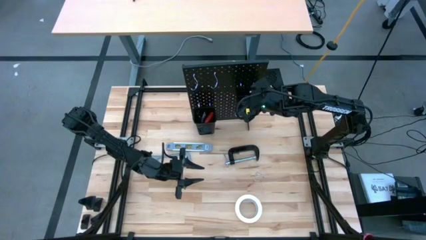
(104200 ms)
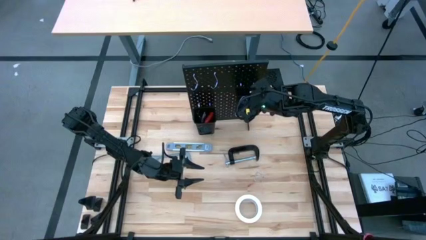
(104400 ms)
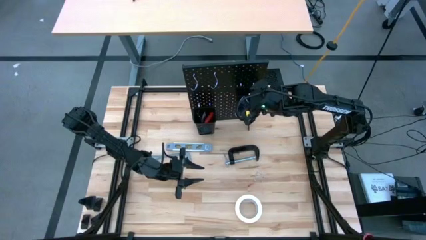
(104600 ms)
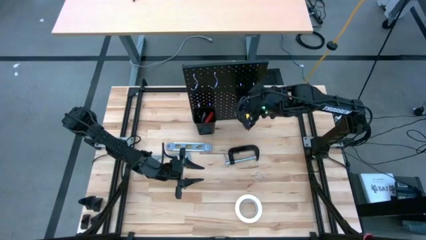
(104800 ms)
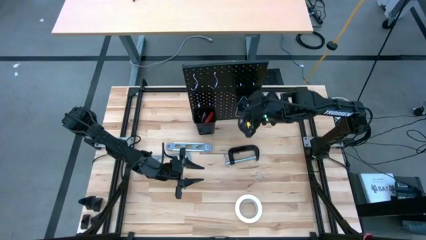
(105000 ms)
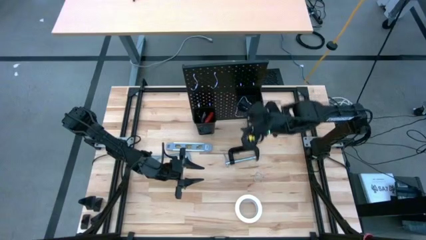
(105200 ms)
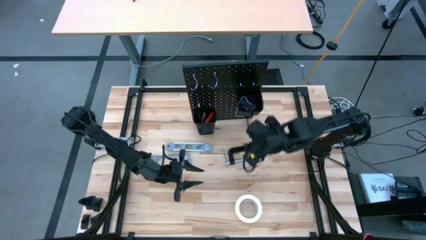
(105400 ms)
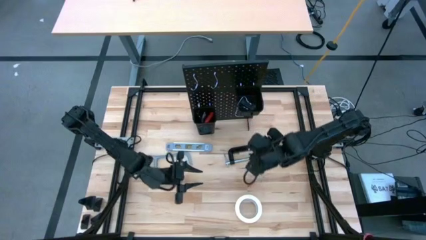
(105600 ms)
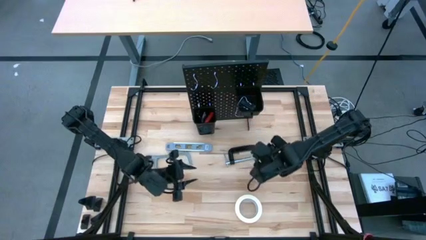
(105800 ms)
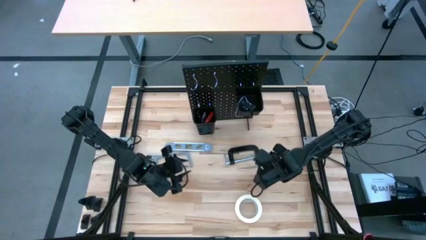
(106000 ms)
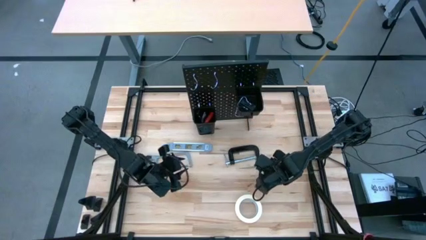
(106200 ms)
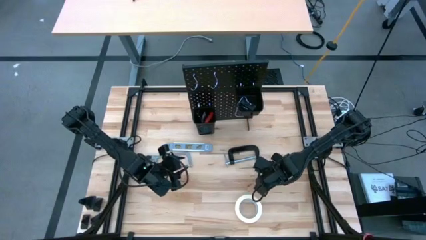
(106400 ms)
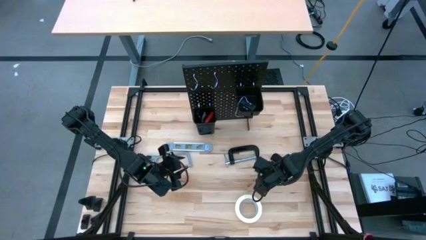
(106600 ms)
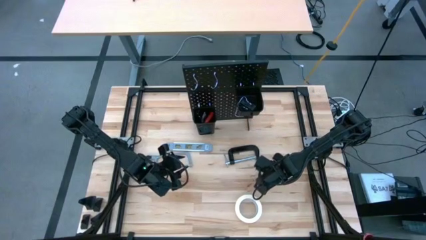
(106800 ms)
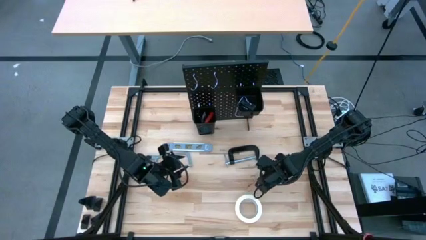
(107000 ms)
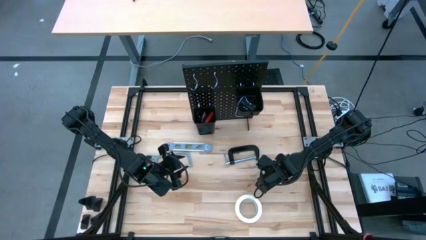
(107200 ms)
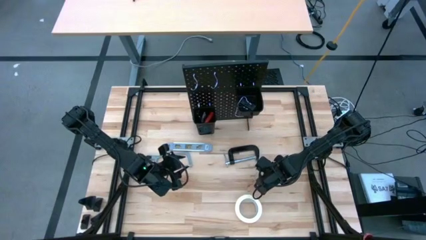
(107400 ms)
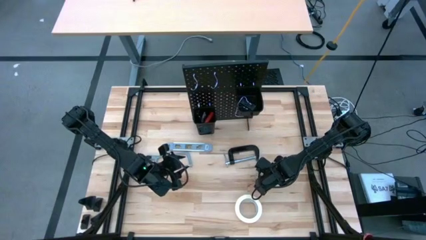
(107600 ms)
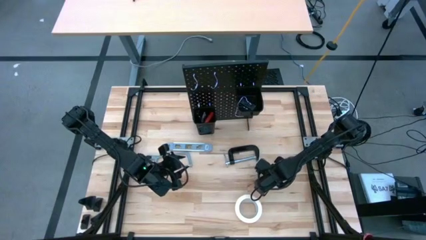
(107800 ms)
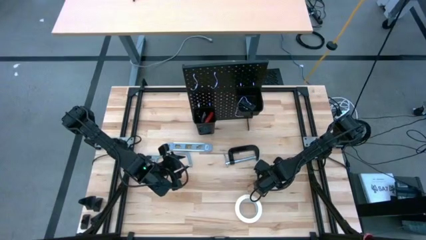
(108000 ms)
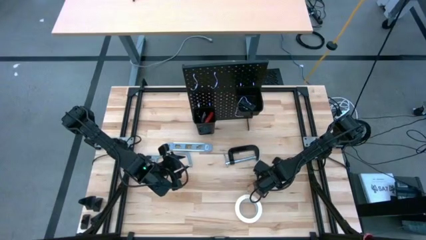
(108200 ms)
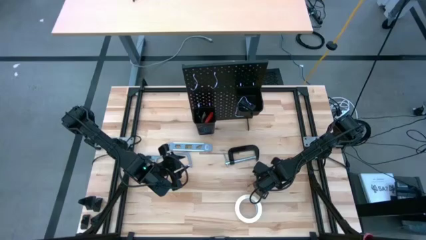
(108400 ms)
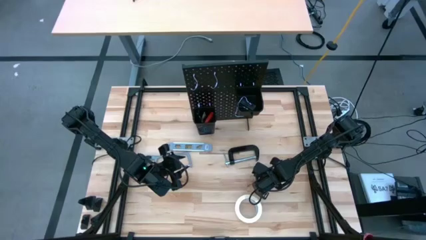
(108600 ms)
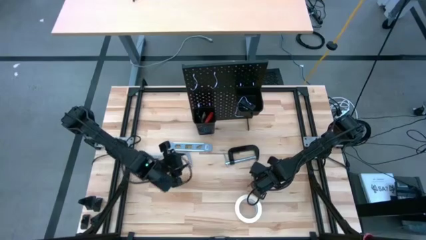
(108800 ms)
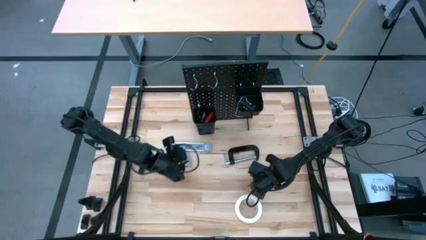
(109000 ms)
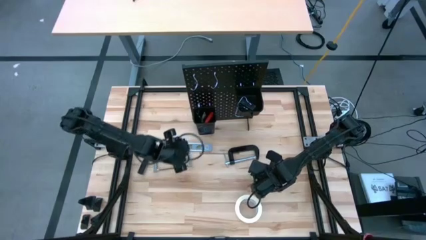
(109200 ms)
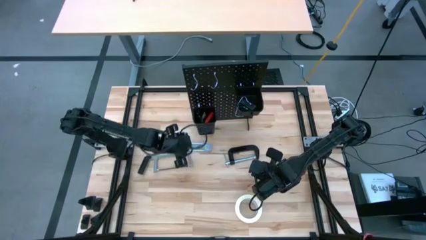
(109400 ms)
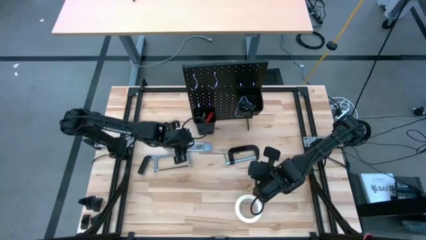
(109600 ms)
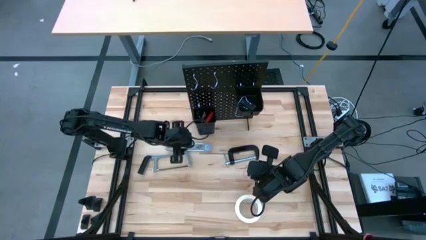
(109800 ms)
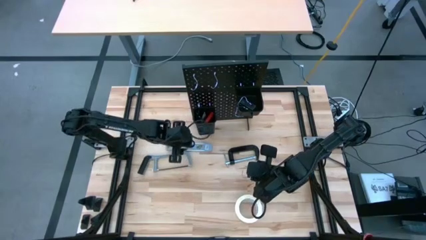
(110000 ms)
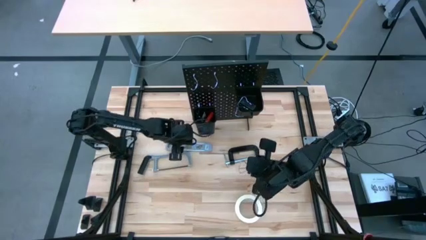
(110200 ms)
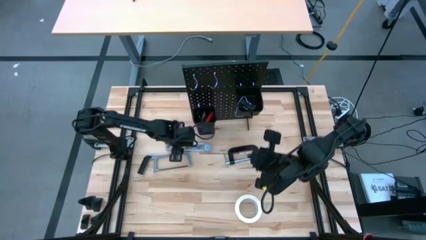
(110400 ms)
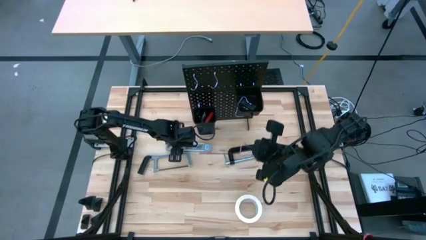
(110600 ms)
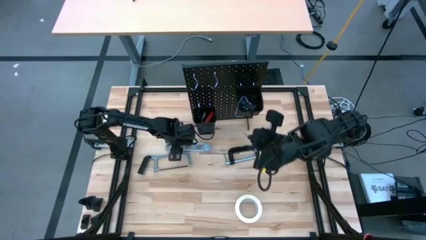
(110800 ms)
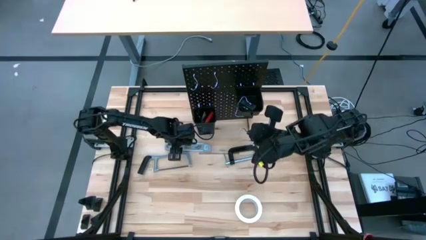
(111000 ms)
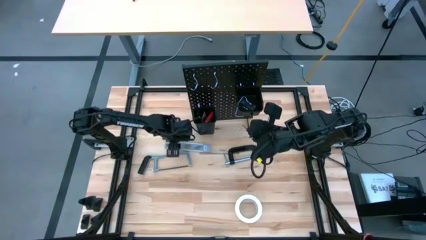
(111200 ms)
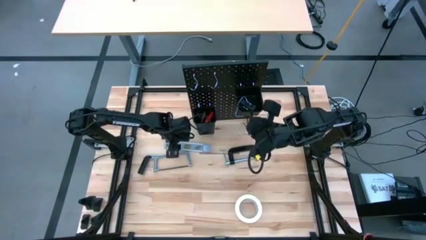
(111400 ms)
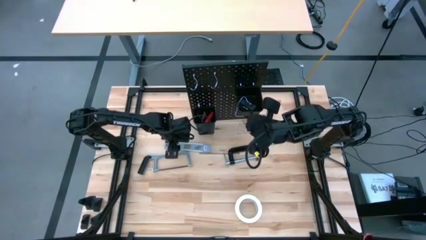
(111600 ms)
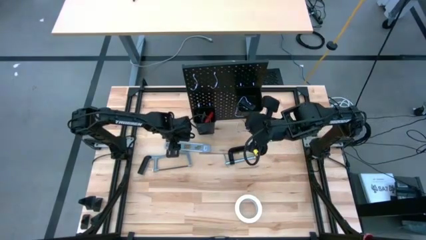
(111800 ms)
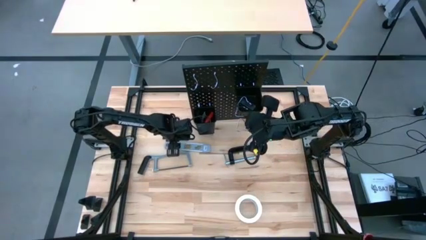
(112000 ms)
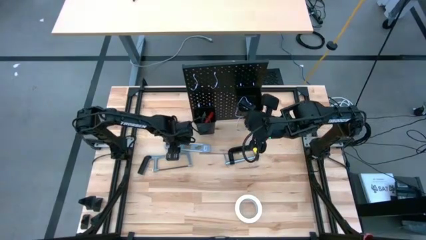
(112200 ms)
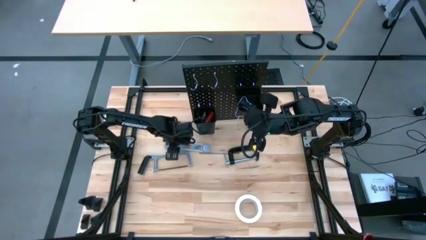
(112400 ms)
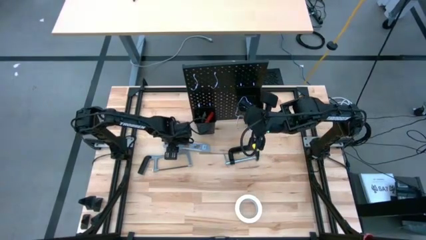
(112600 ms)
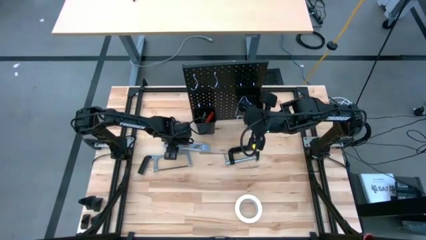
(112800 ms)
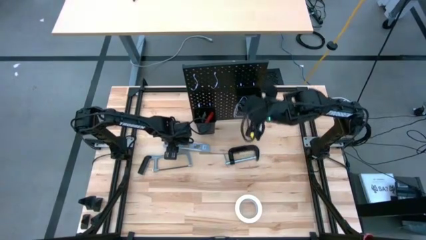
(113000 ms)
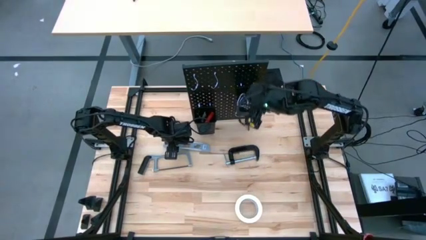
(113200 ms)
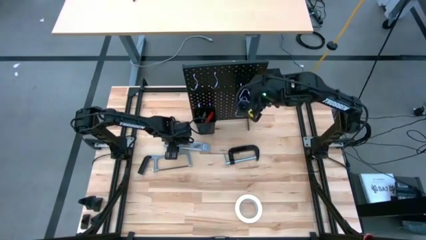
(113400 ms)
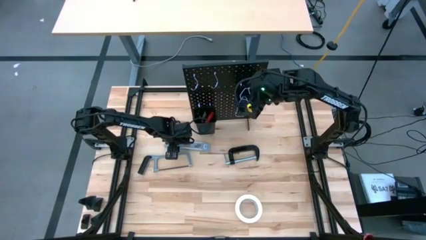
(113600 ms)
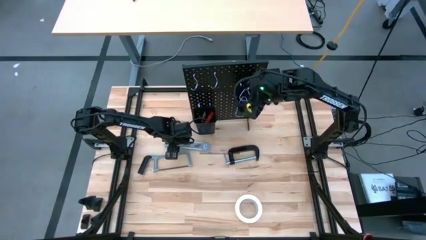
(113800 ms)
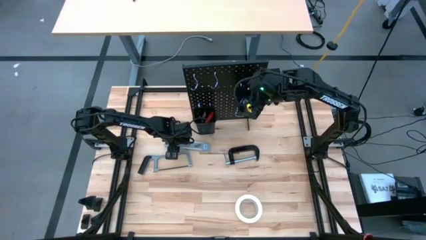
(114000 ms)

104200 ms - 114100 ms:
Task: Hang tools onto peg board
Put the binder clip into the top black bin on the pegboard

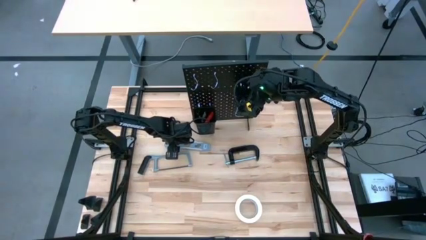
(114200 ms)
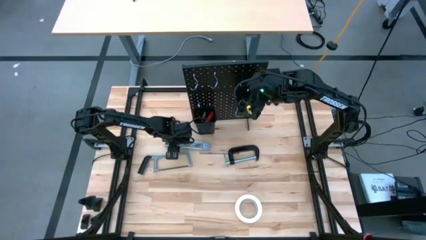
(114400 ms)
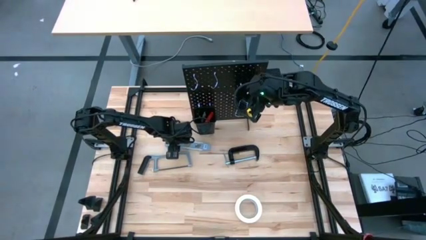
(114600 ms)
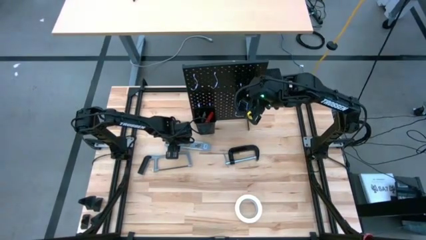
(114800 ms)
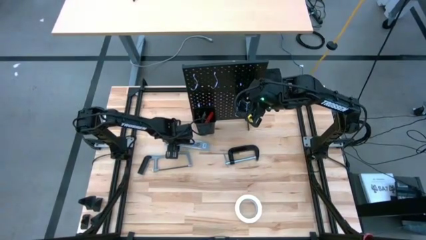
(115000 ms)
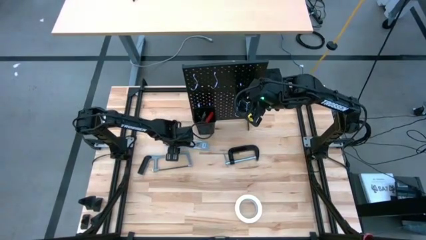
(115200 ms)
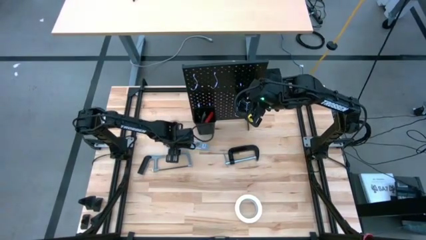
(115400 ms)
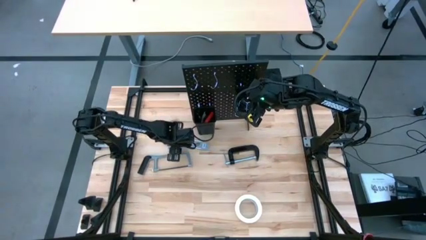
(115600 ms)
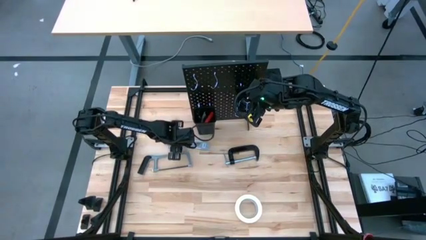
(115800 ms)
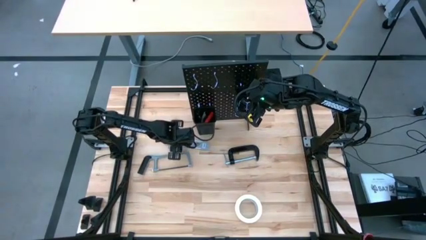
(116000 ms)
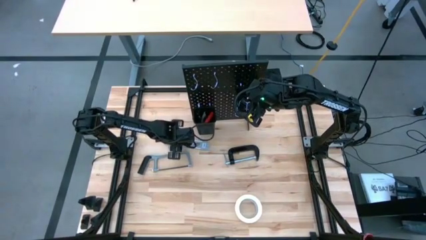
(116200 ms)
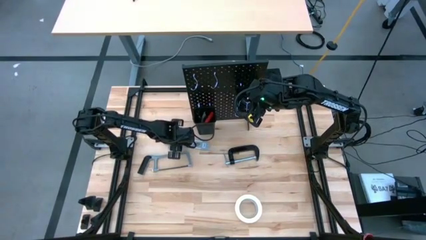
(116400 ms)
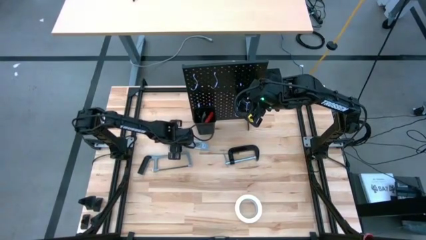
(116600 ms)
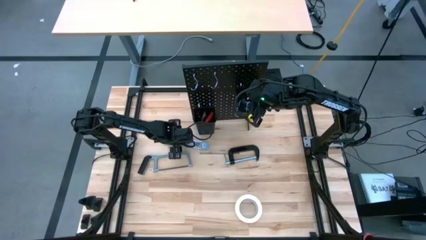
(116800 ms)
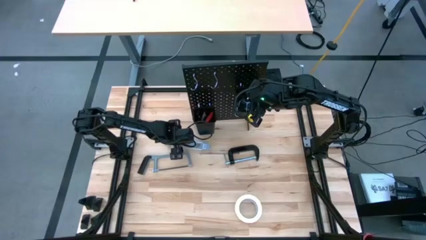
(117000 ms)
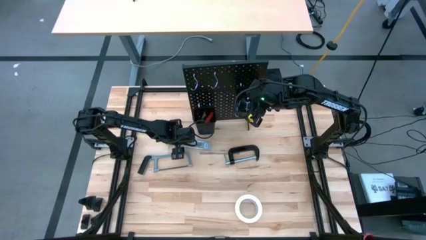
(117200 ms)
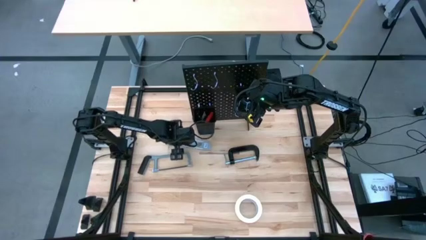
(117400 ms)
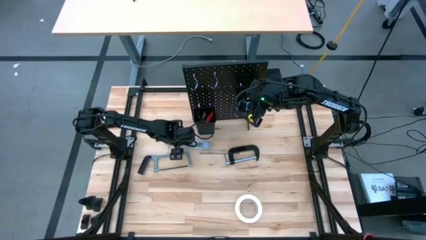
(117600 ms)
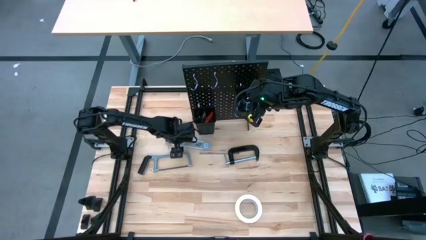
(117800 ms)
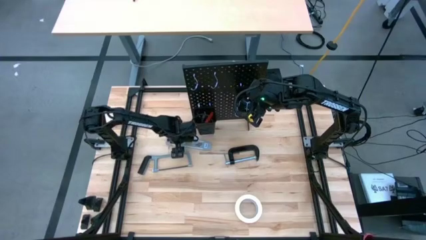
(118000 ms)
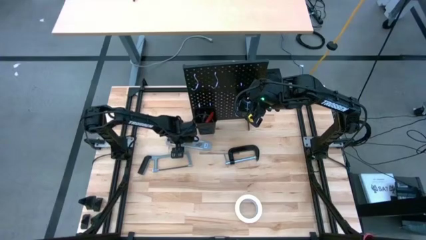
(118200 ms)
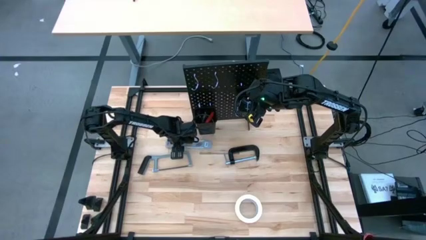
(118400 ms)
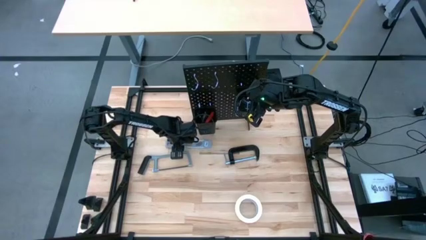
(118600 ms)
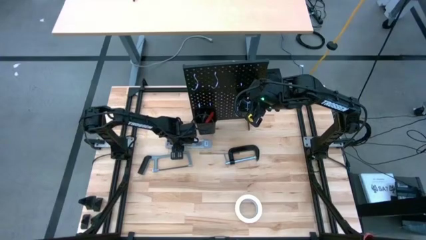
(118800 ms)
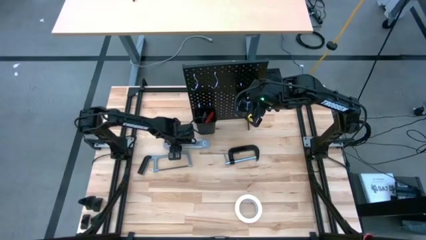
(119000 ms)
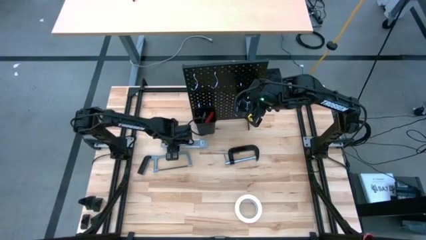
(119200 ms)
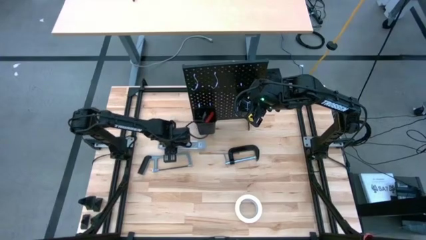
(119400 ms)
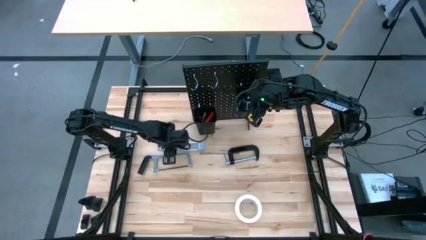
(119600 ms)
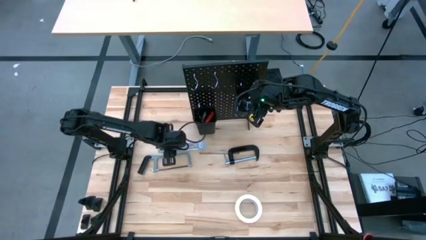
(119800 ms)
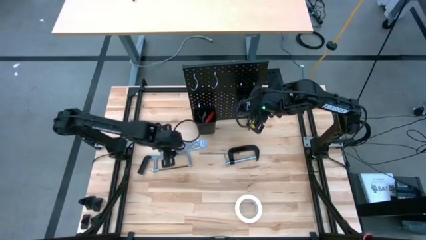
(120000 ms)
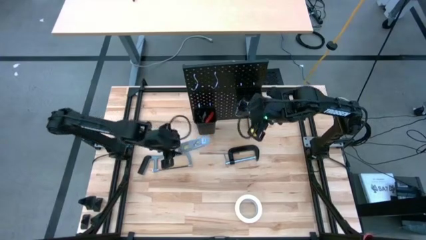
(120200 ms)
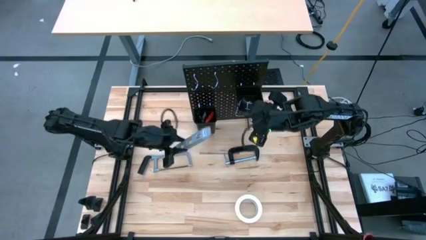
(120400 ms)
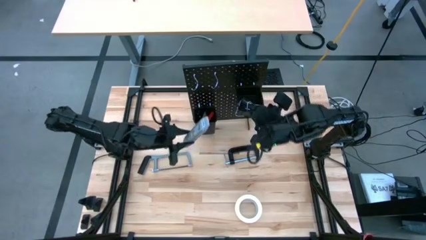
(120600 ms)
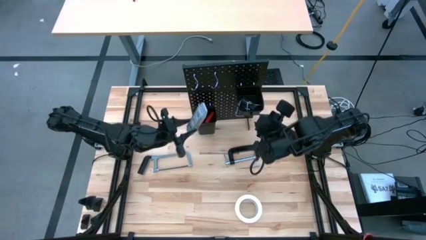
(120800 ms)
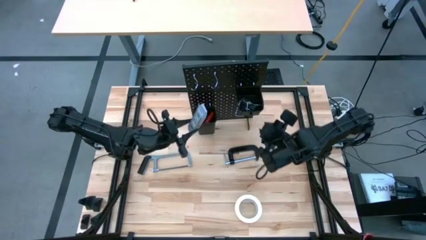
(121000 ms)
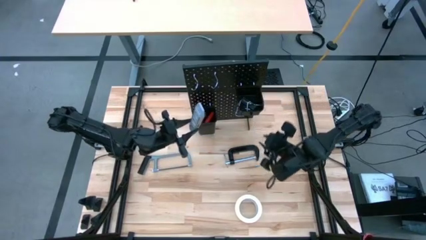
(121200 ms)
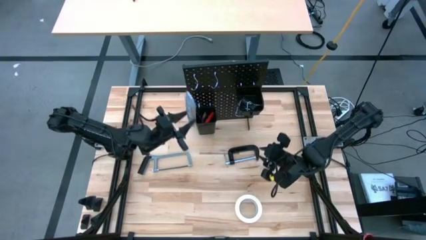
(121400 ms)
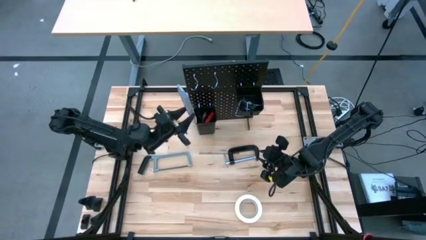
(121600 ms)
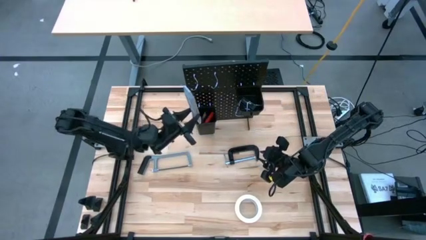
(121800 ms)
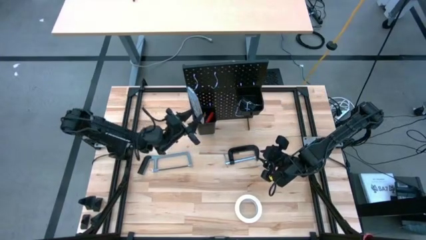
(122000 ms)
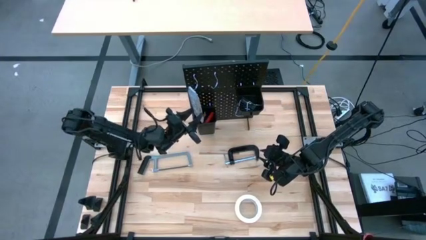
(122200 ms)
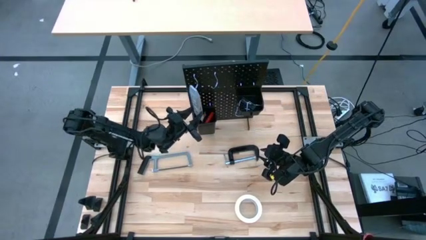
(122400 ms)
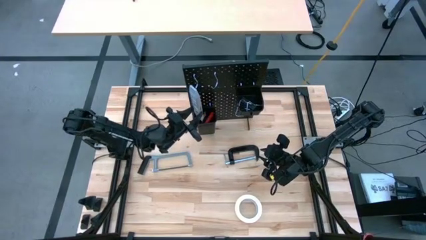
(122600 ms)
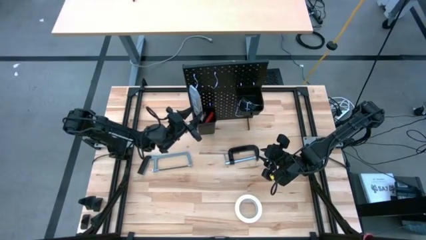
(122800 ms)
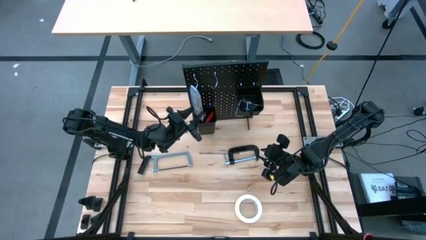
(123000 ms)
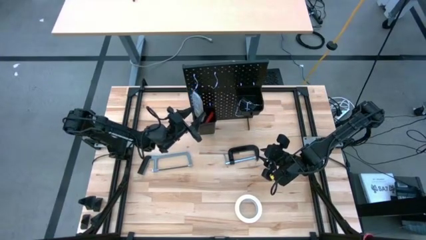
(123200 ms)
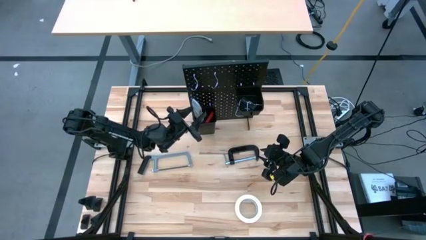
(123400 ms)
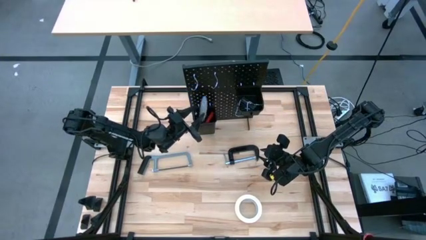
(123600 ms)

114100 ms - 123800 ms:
Put the big spirit level into the bottom black bin on the pegboard
